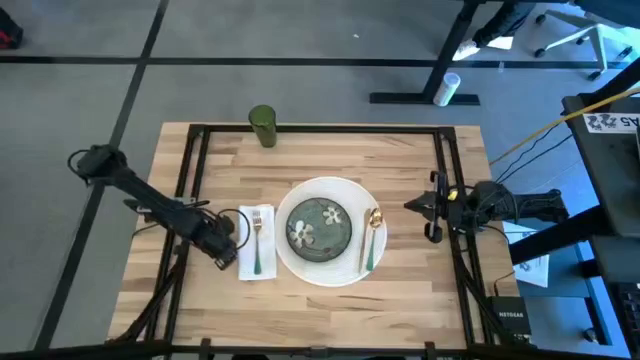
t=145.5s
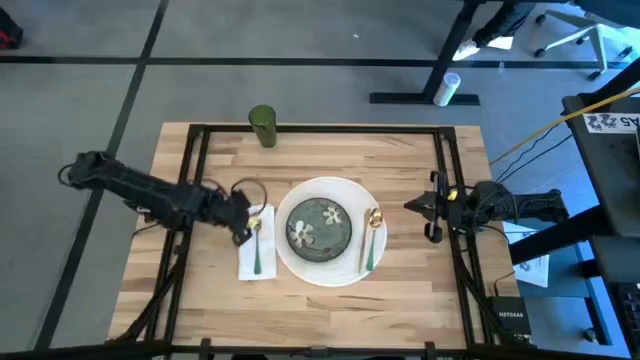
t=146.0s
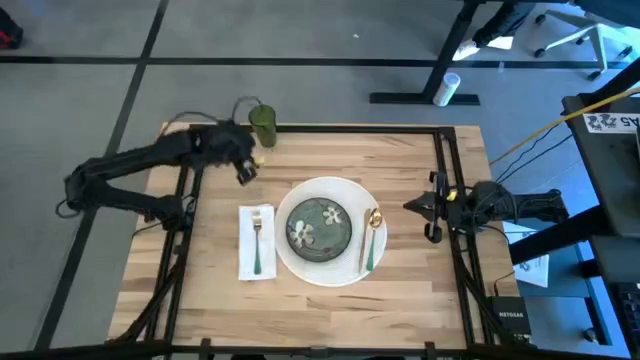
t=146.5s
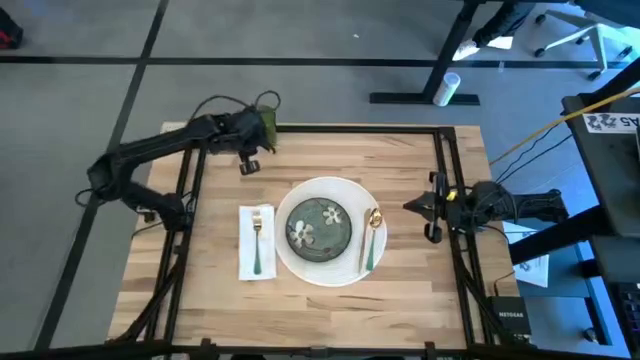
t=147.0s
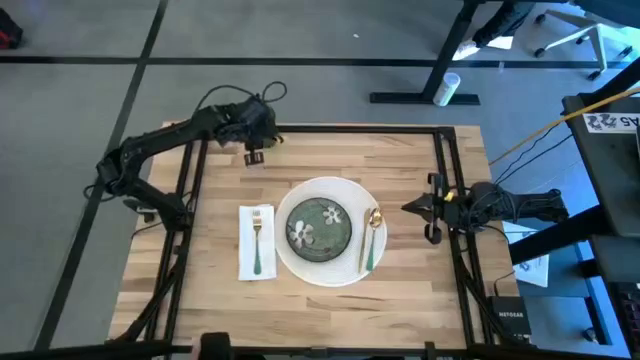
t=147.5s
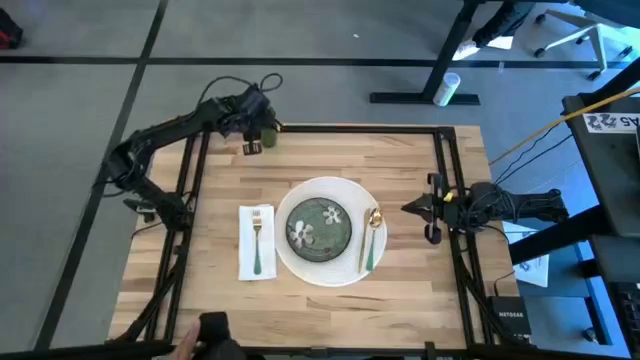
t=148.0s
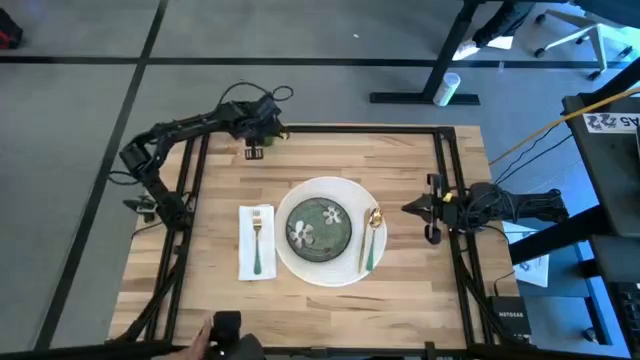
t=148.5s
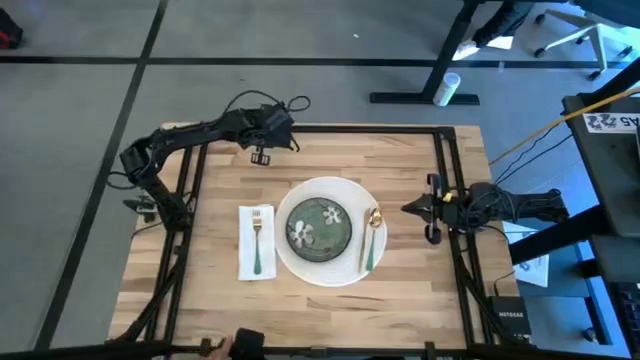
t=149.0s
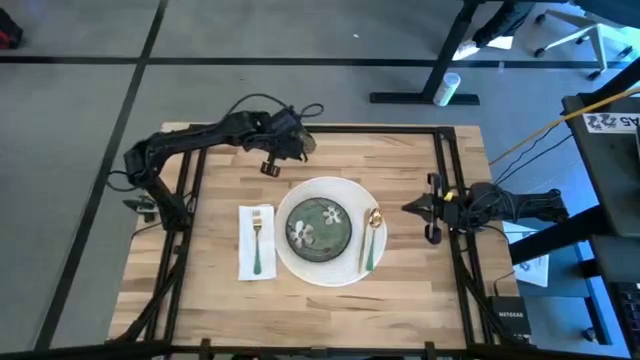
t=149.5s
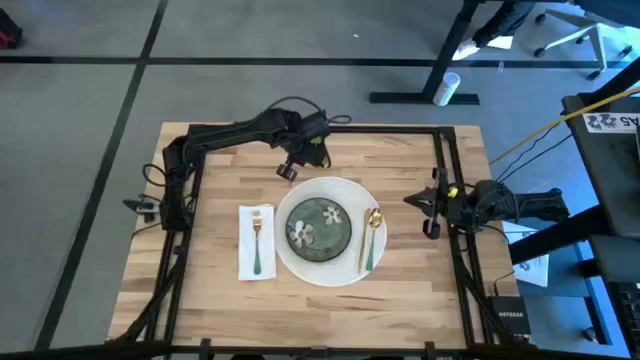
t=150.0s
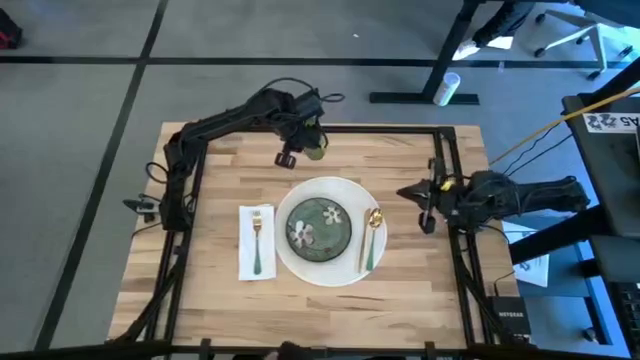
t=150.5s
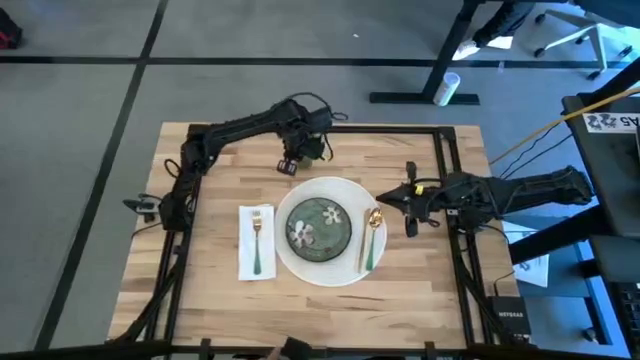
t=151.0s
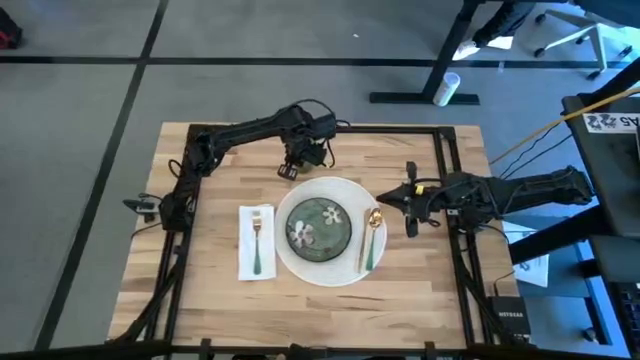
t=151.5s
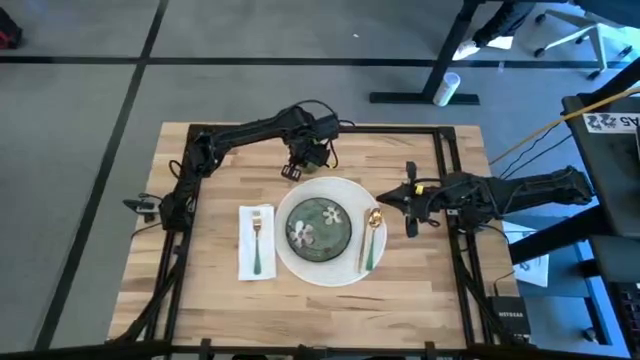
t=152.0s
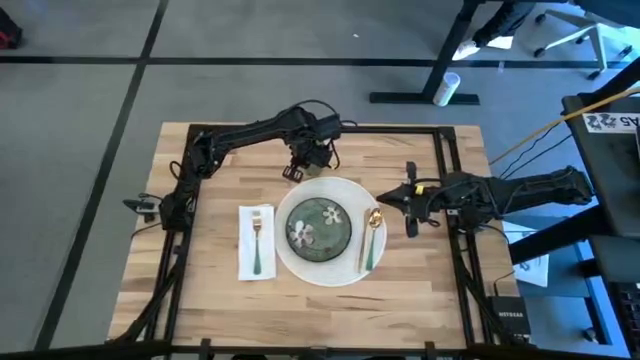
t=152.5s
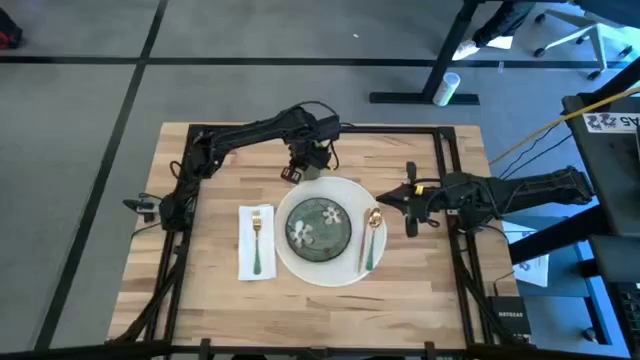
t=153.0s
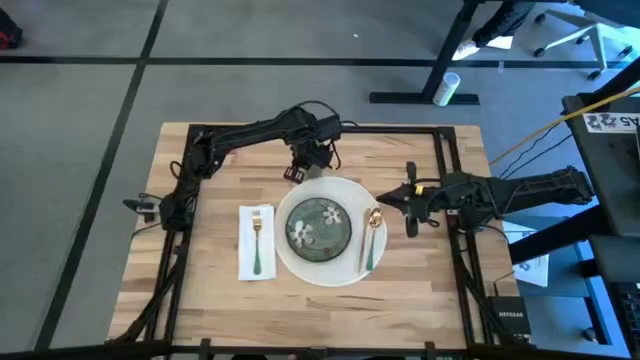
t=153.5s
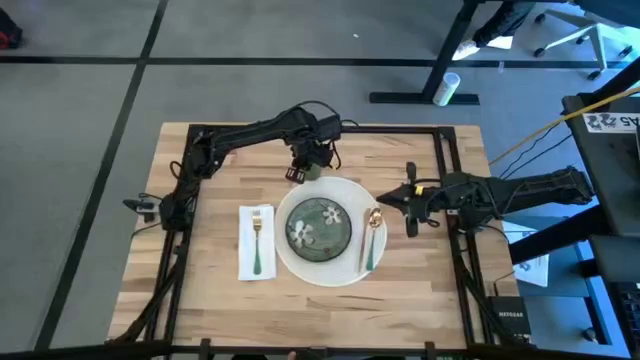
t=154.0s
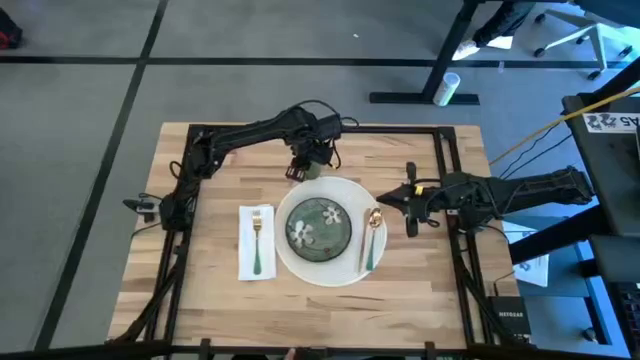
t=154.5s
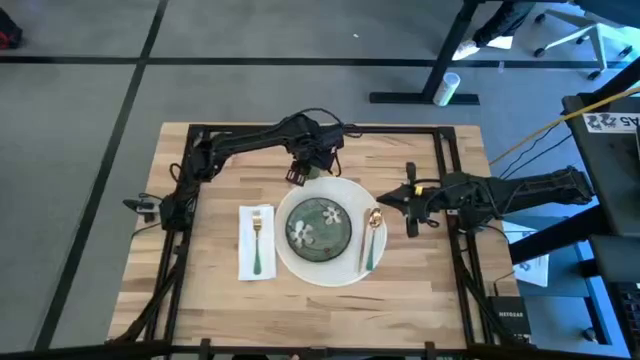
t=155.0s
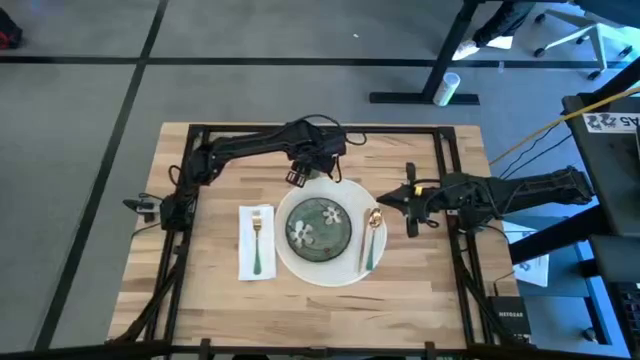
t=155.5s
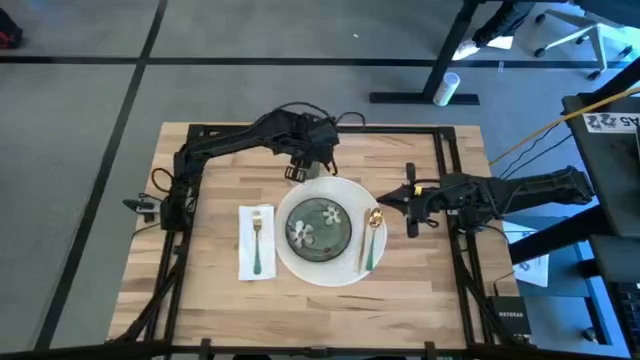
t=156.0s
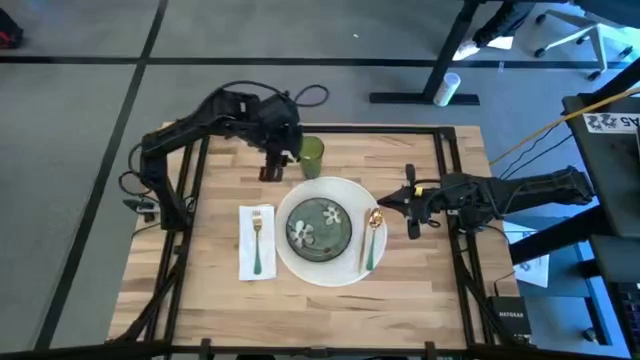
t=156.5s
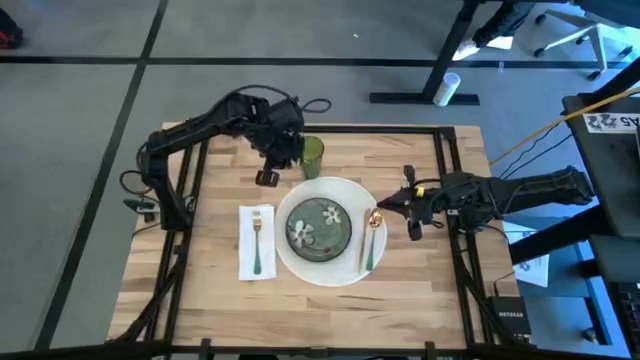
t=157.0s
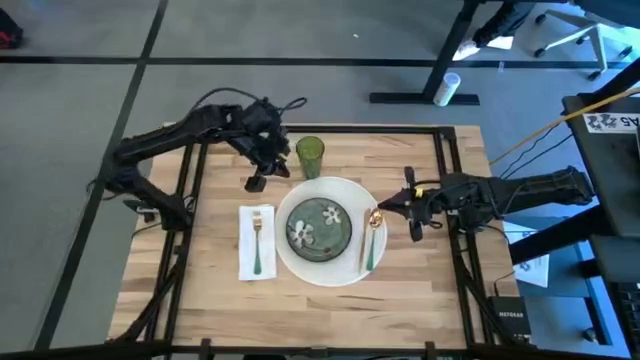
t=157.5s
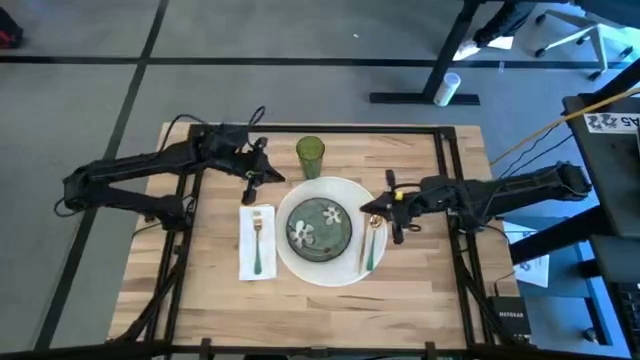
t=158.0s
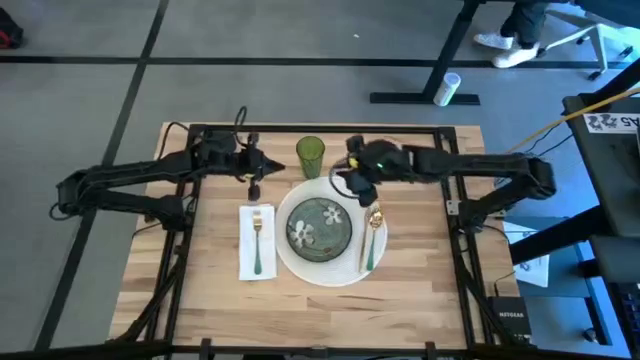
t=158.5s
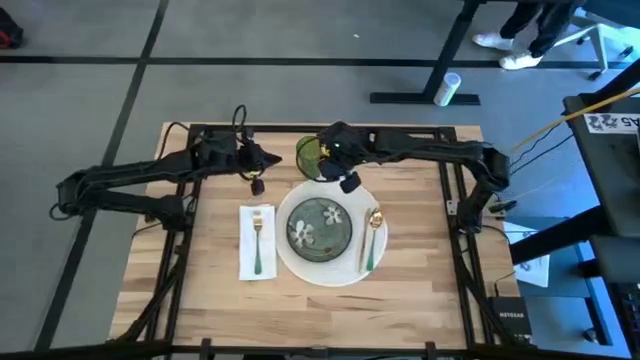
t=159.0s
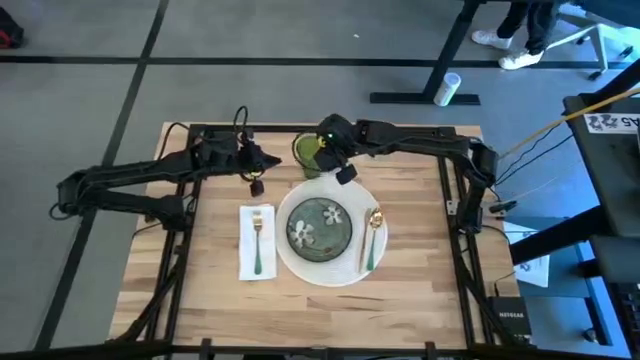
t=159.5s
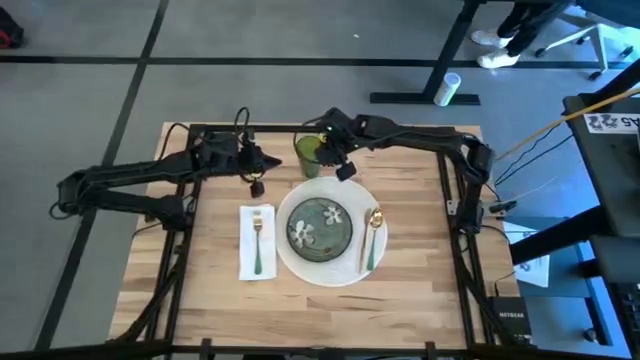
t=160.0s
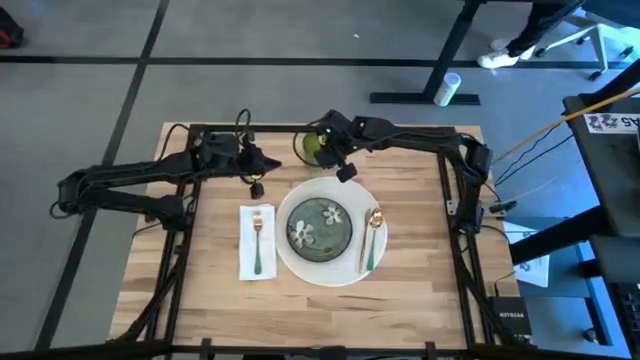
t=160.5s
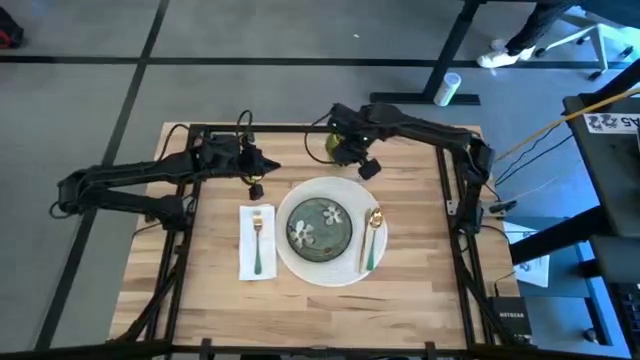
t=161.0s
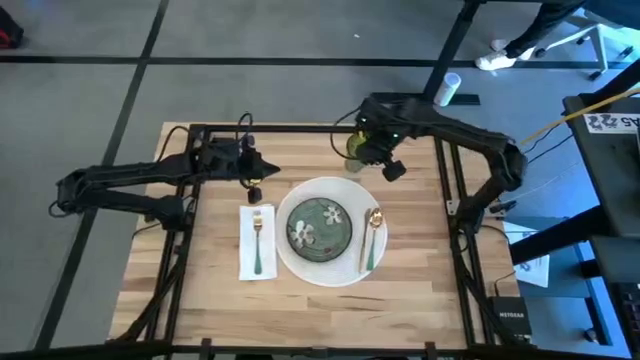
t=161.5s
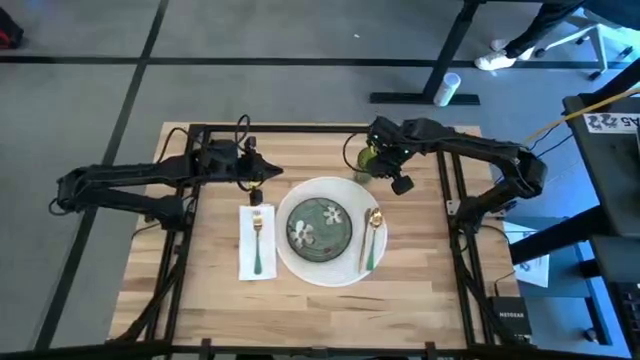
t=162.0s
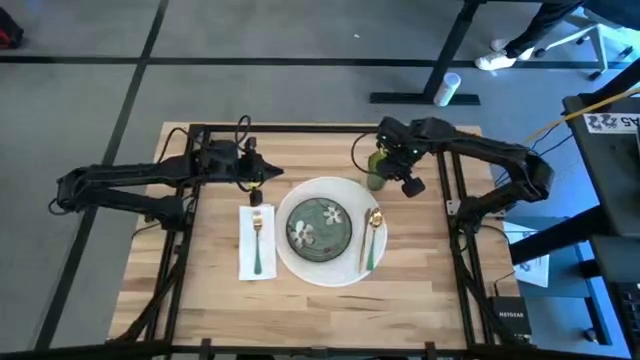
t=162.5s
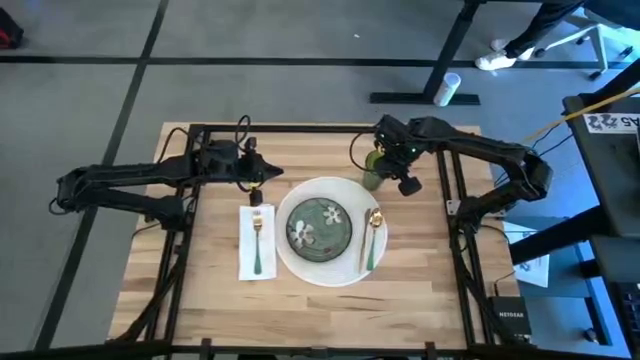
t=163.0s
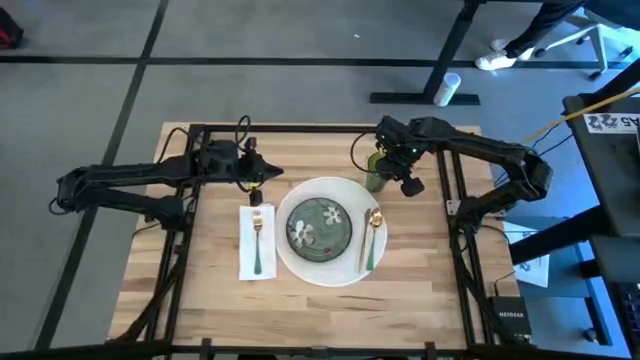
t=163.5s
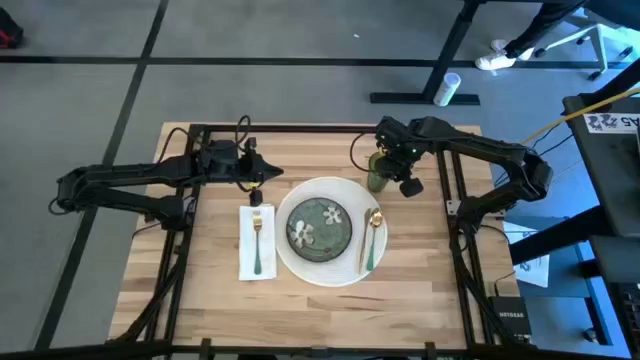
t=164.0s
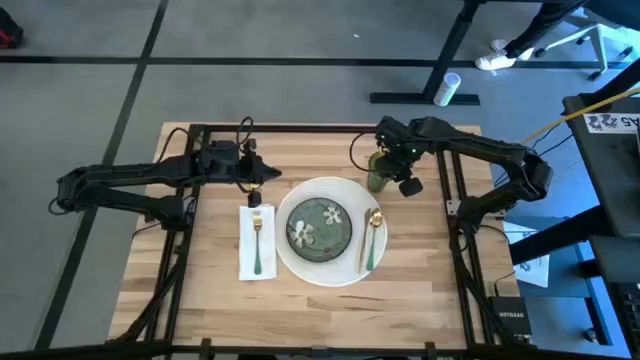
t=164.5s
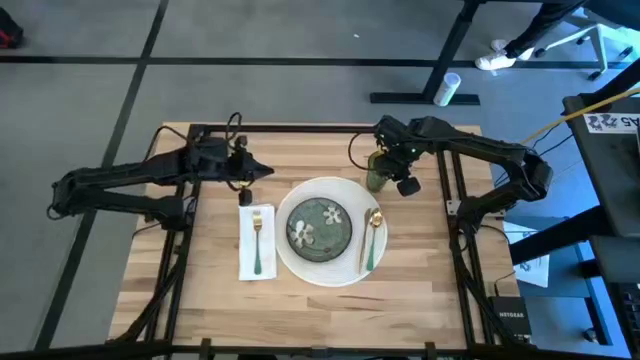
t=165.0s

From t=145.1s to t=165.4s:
Task: Set table place
Put the green cup on the top right of the white table mat

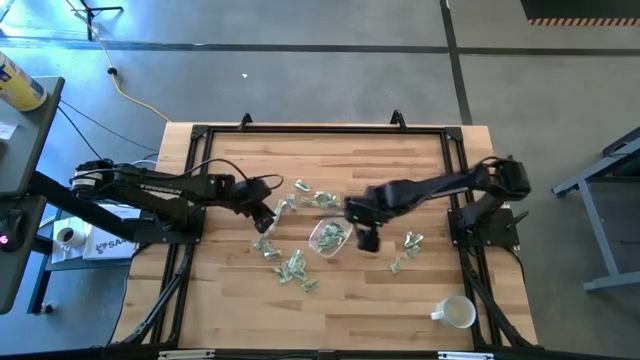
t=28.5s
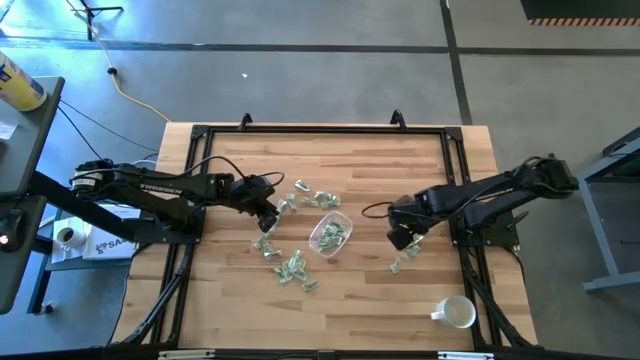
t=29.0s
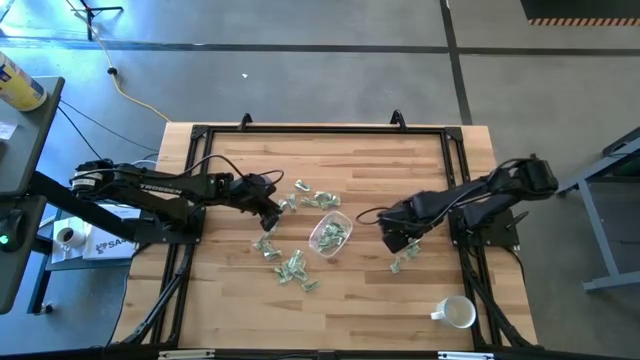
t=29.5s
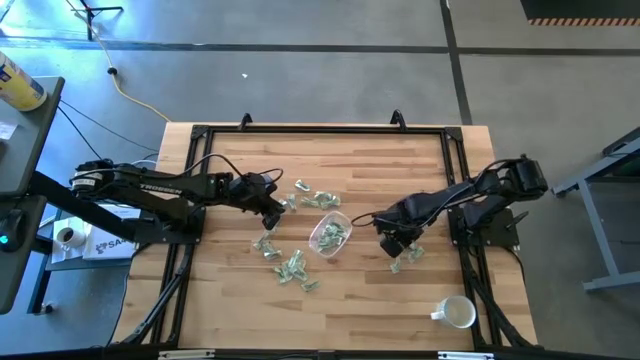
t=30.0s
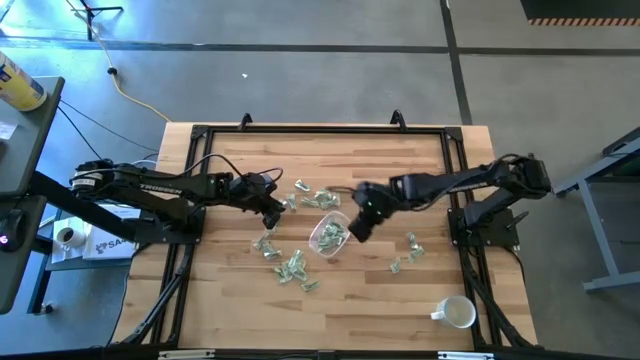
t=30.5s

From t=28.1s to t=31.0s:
Task: Pick and place Stevia / Truvia into bins
Put the stevia packet into the transparent bin
